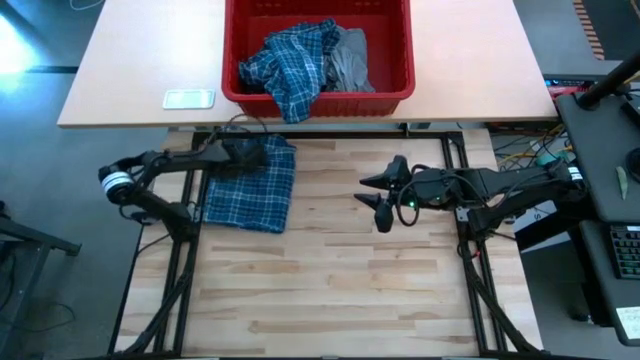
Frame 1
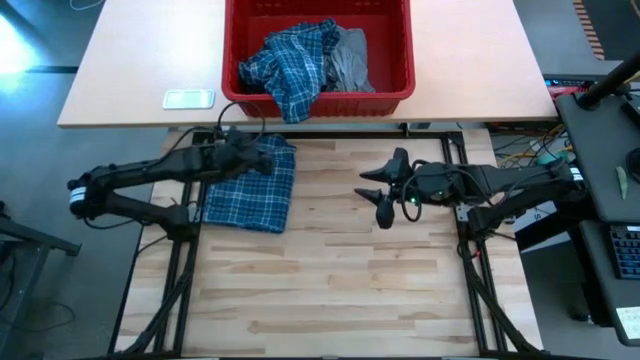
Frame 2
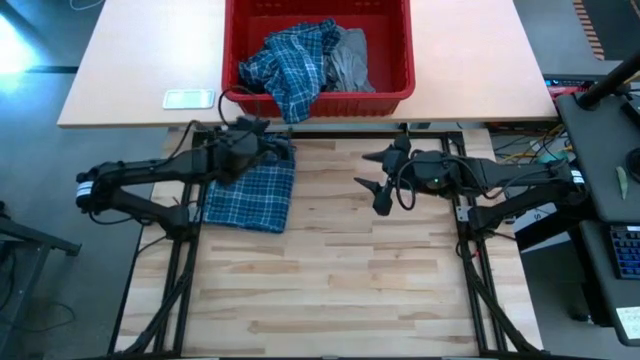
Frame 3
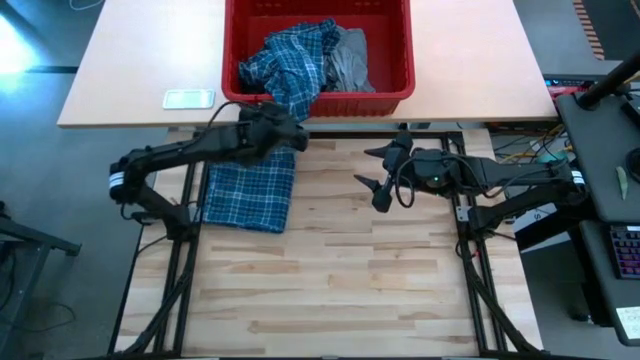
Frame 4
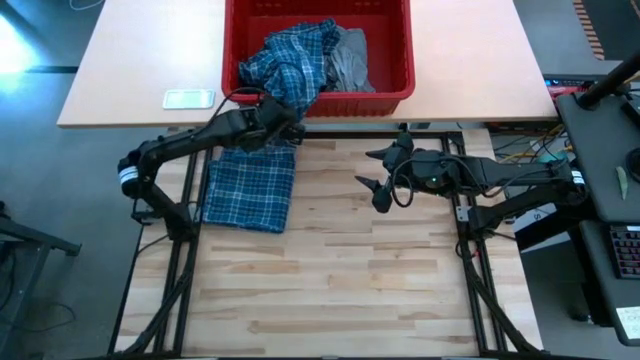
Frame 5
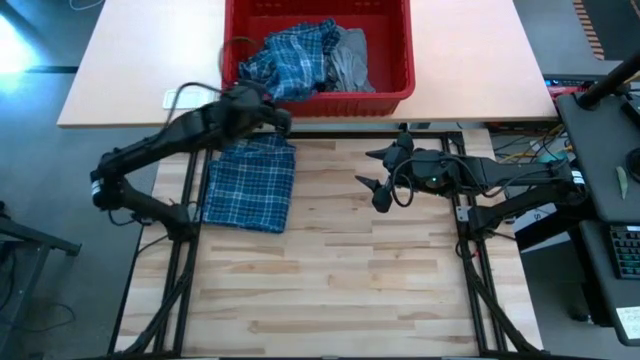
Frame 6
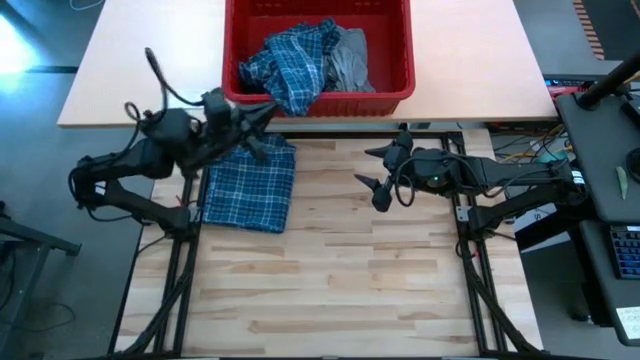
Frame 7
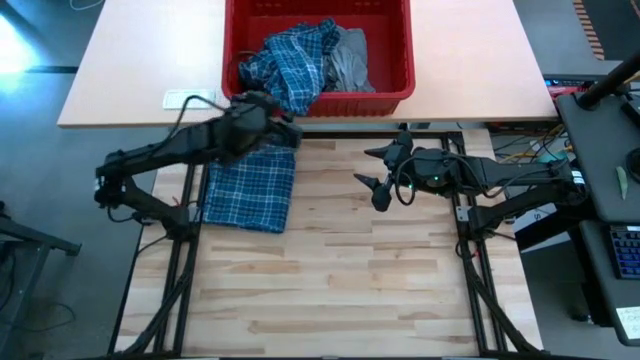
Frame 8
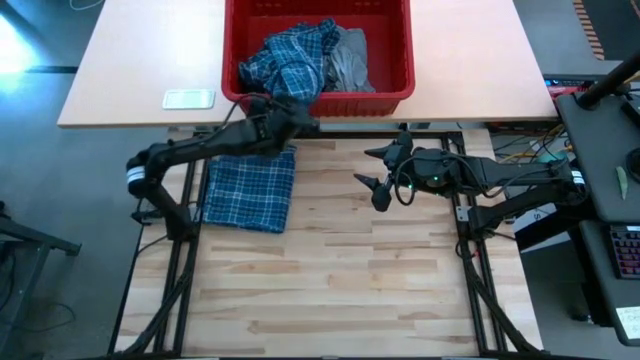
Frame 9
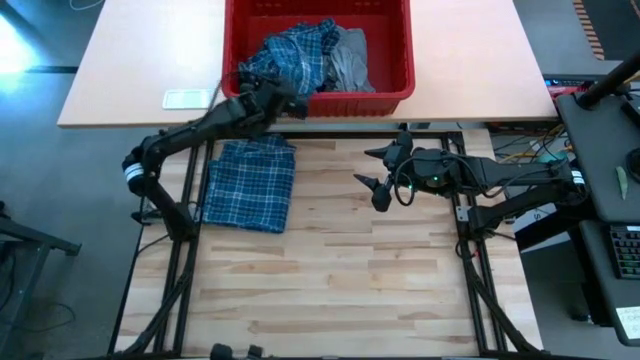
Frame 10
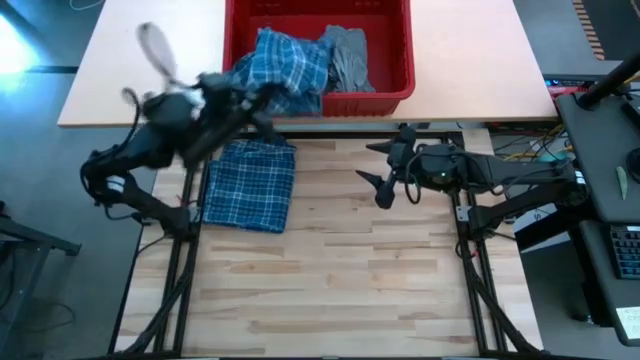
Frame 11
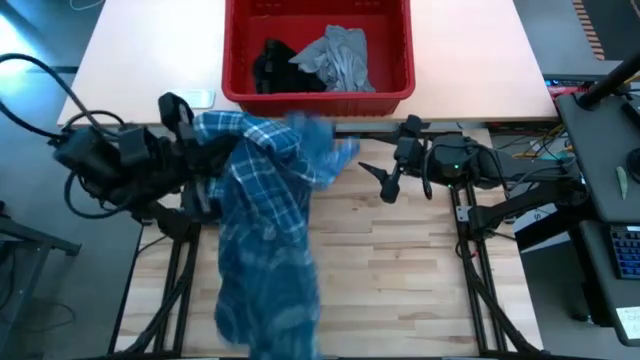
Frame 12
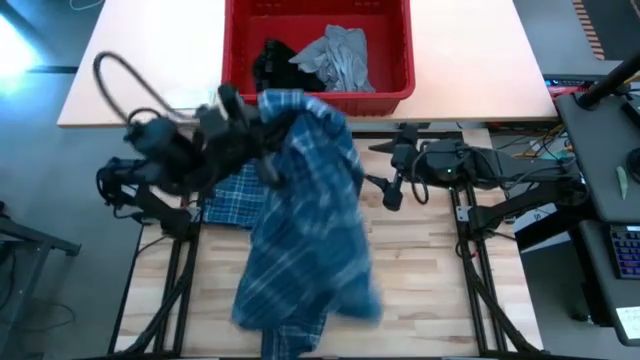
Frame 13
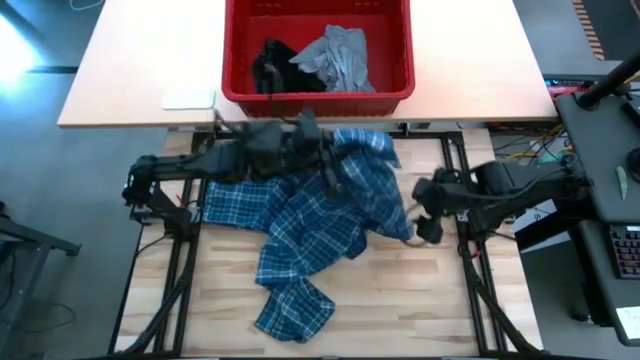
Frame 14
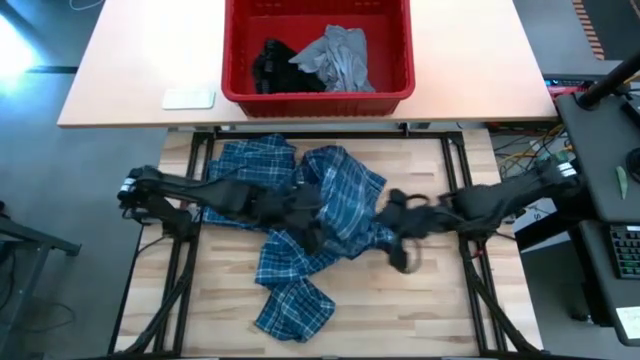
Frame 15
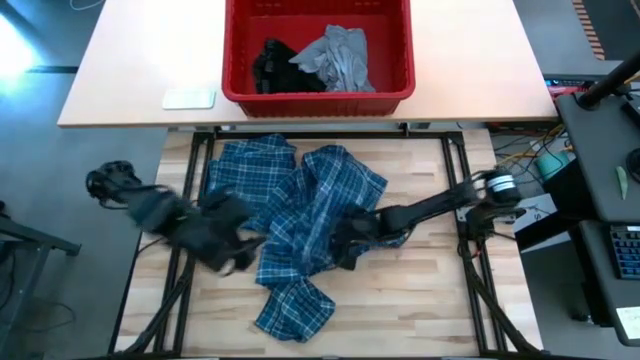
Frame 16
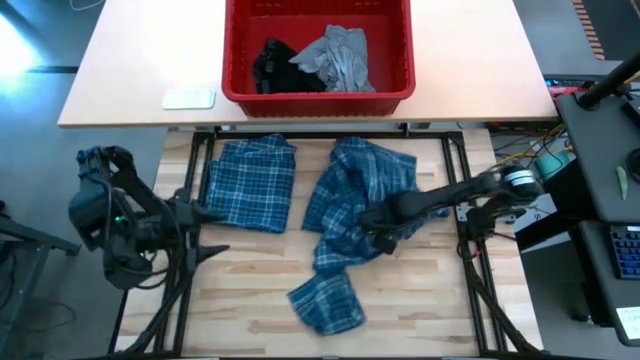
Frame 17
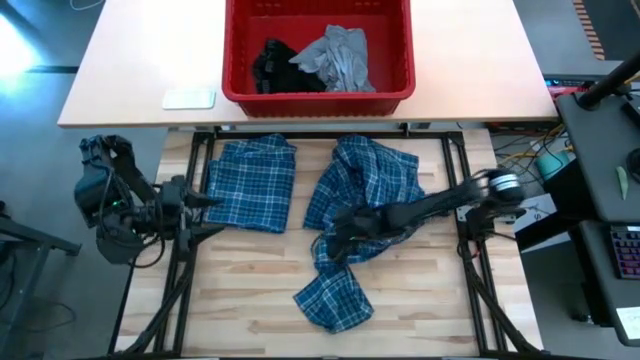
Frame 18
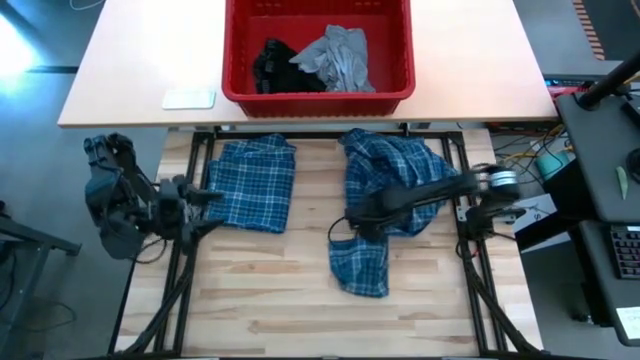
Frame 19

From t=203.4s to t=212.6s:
Task: Fold Laundry from Bin
Fold the blue patterned long sleeve shirt

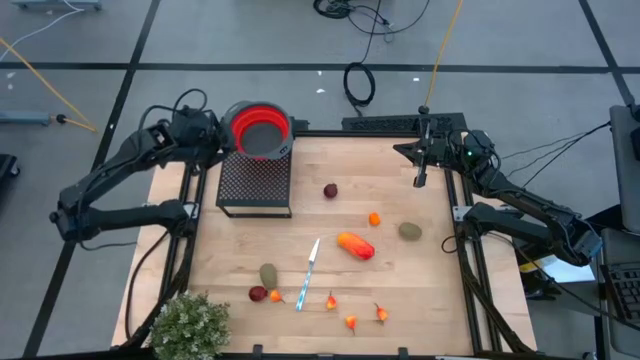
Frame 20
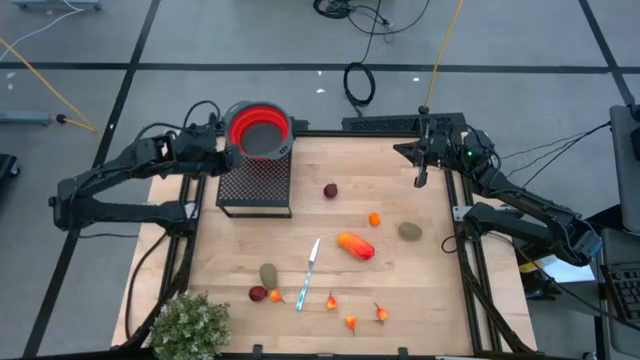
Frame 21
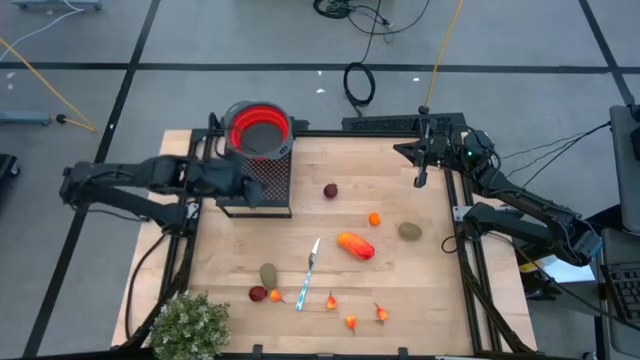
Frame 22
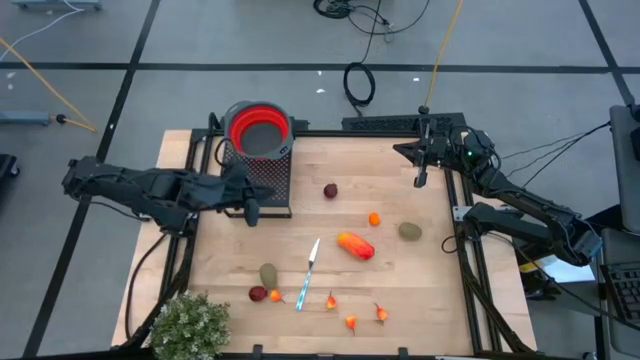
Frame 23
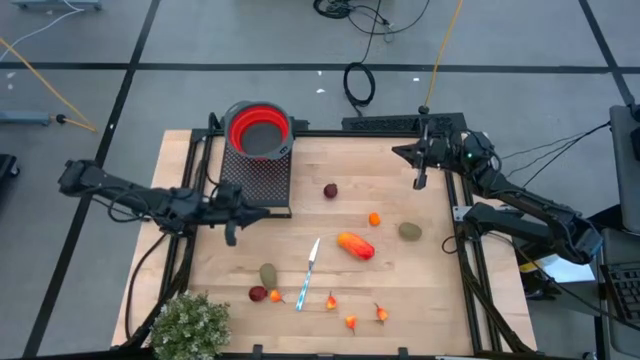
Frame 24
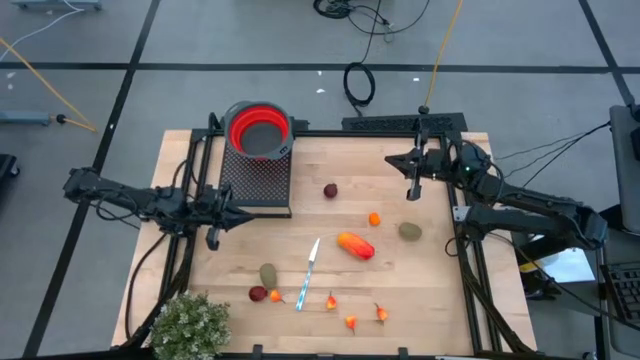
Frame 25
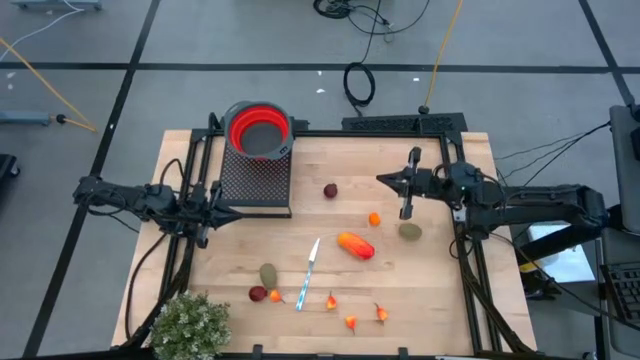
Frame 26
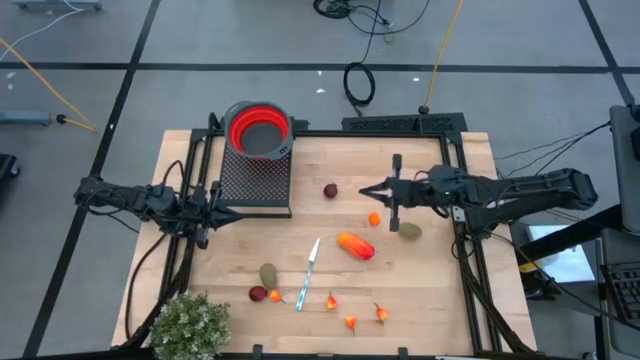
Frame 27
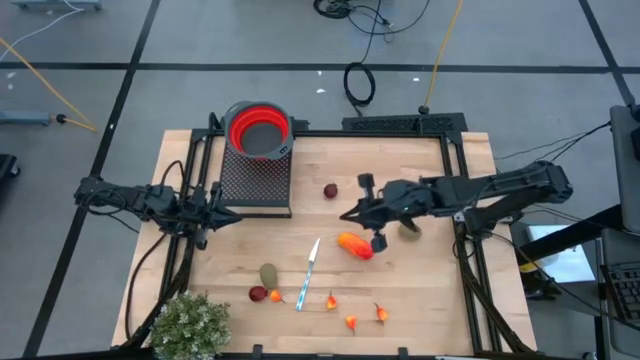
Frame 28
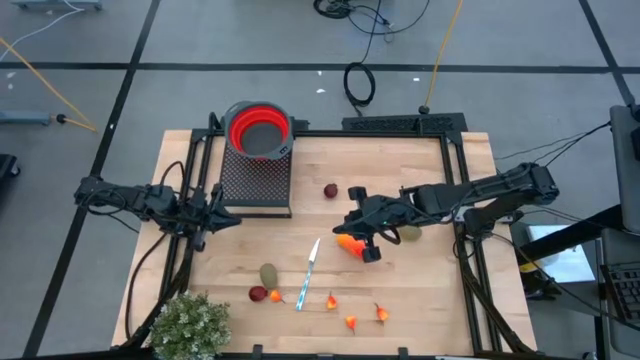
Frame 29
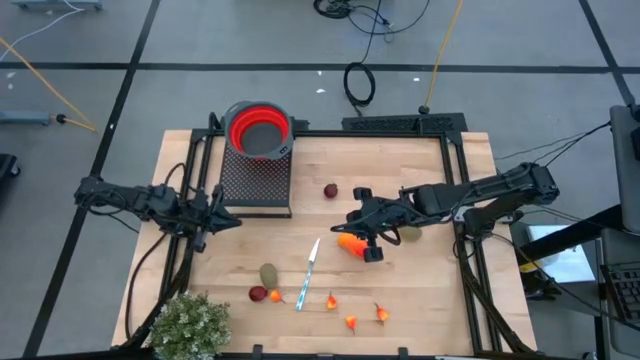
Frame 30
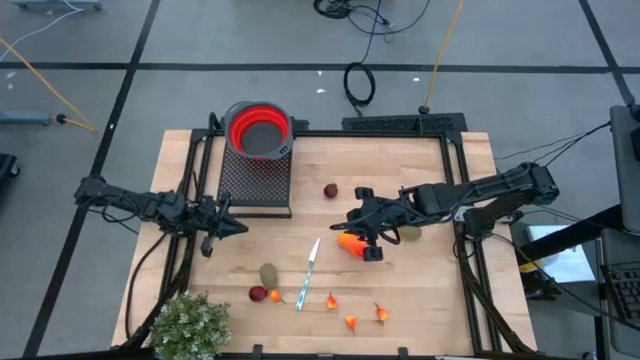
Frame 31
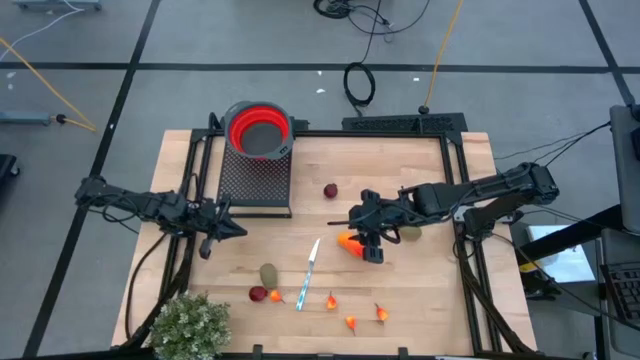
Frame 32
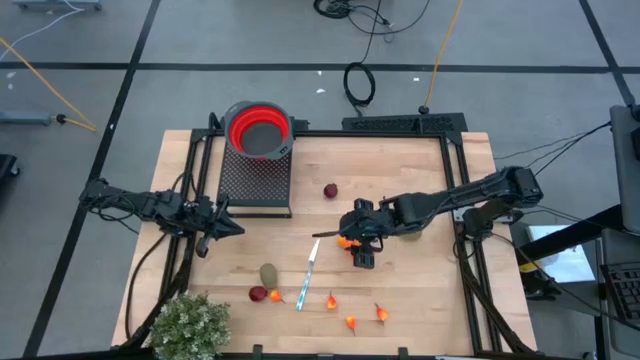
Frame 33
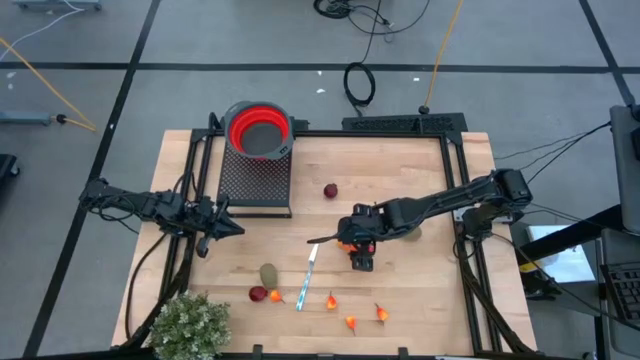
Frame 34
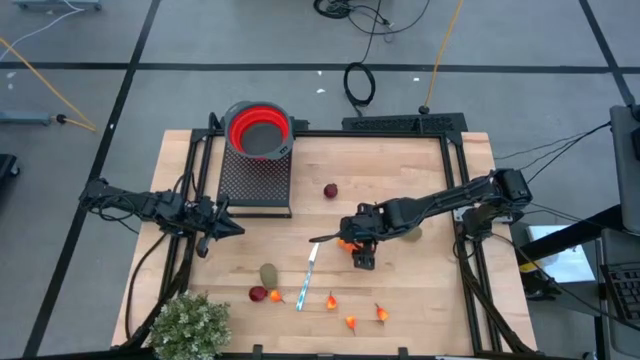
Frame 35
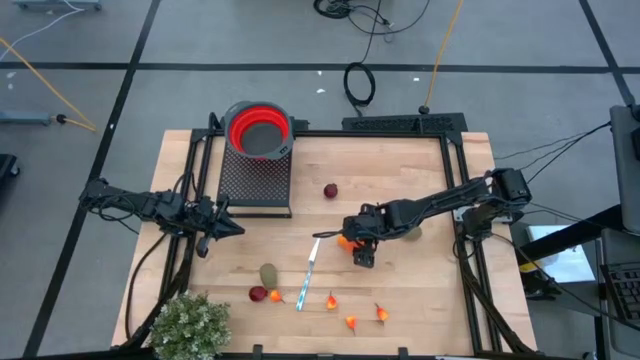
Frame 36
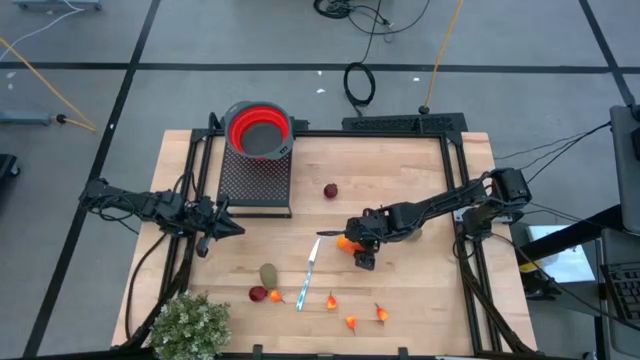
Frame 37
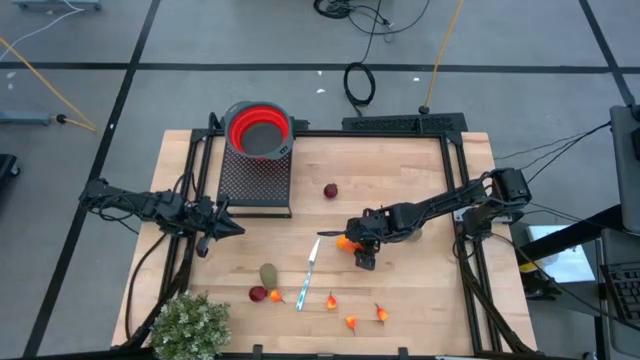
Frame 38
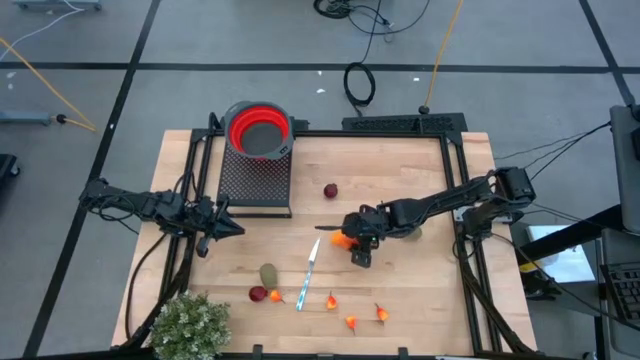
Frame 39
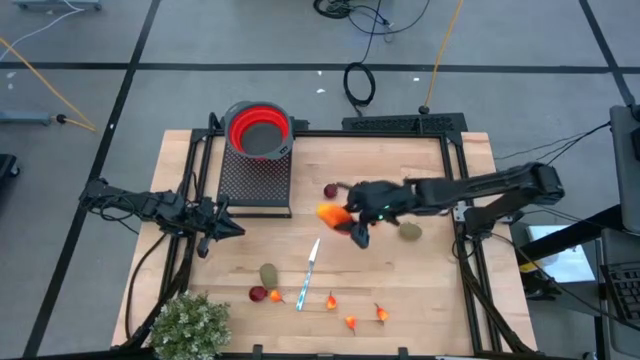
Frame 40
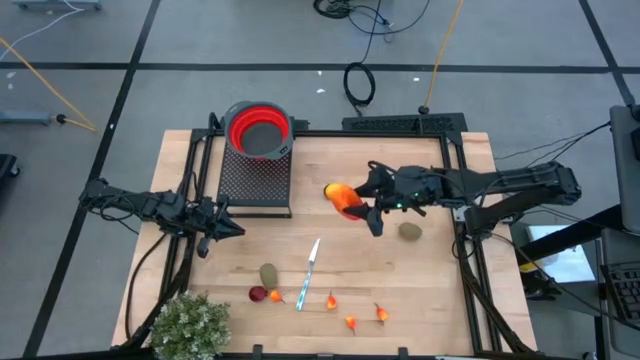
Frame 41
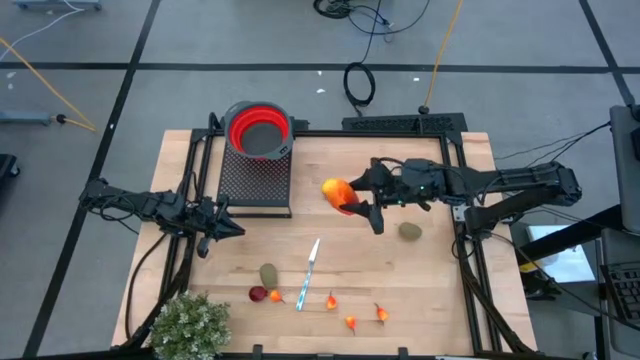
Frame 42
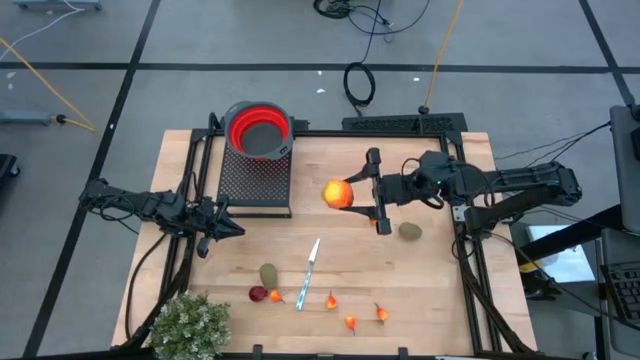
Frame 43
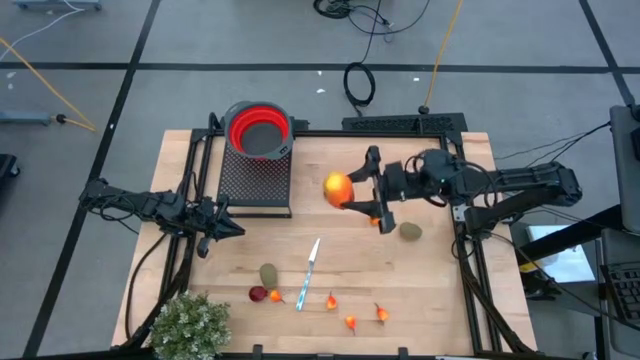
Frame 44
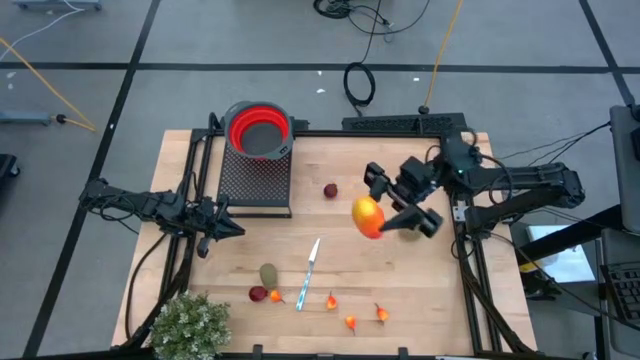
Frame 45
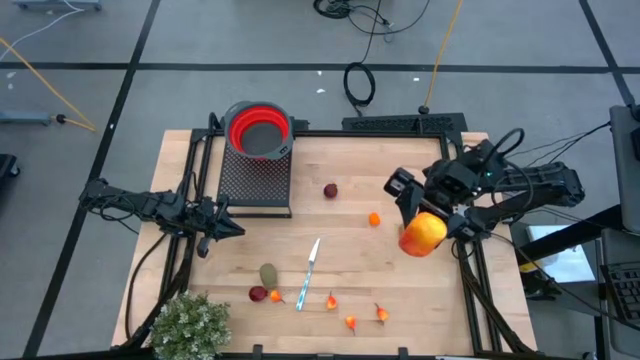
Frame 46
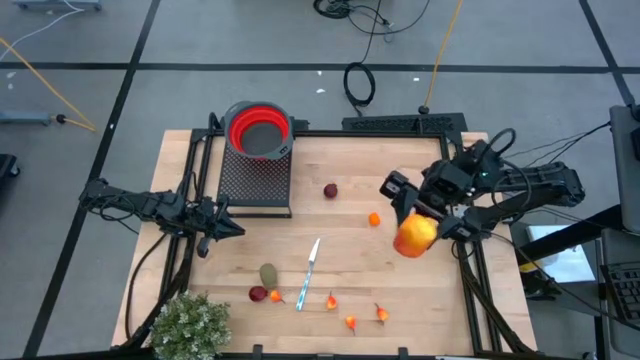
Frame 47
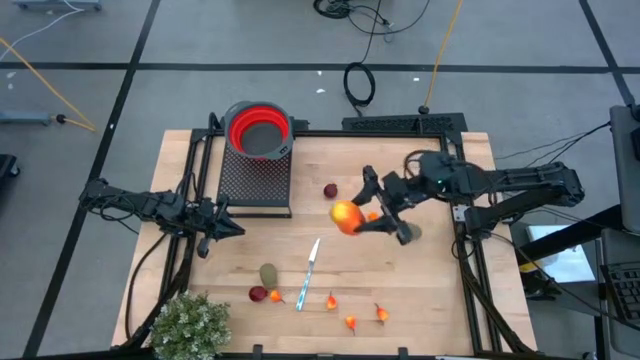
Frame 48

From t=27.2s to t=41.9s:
Task: Pick & Place Fruit
Put the orange mango into the red strainer bowl on the shelf
